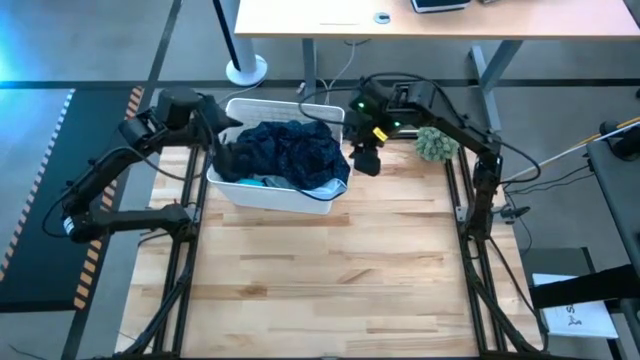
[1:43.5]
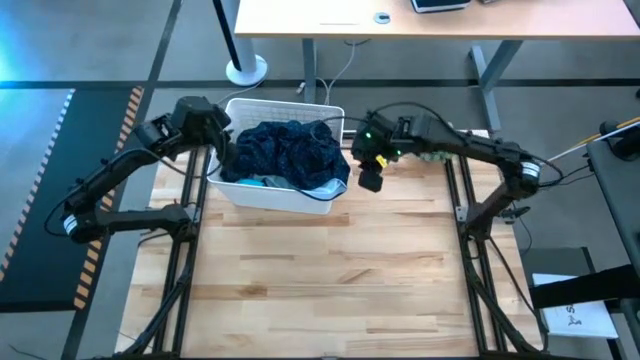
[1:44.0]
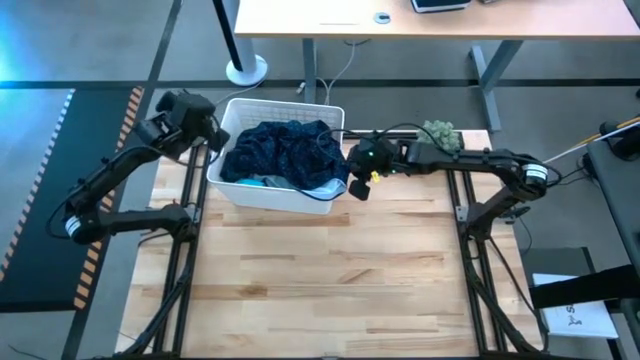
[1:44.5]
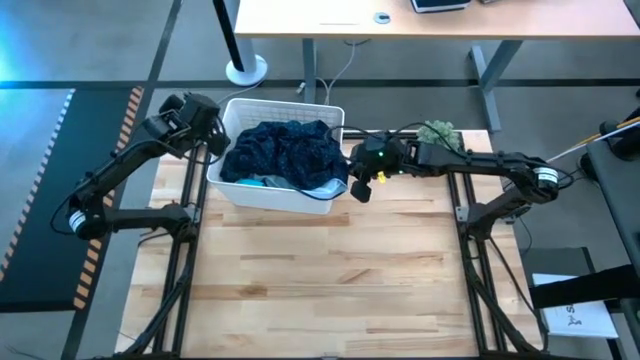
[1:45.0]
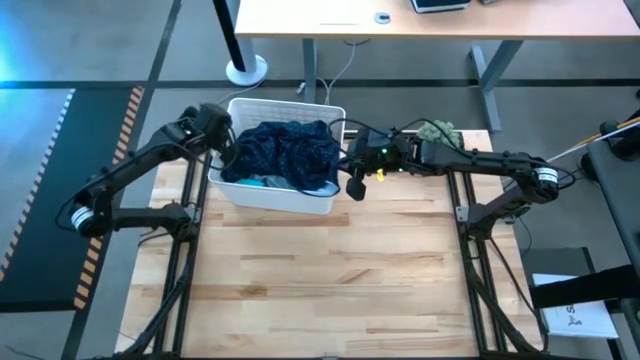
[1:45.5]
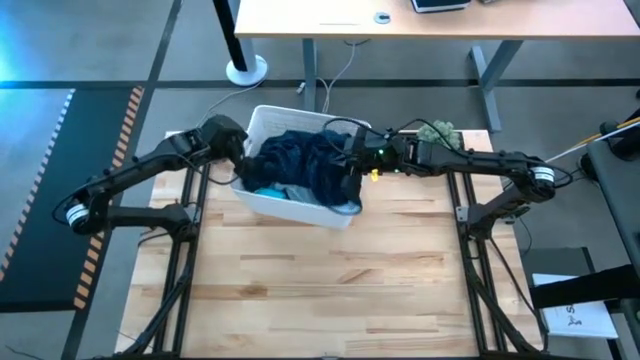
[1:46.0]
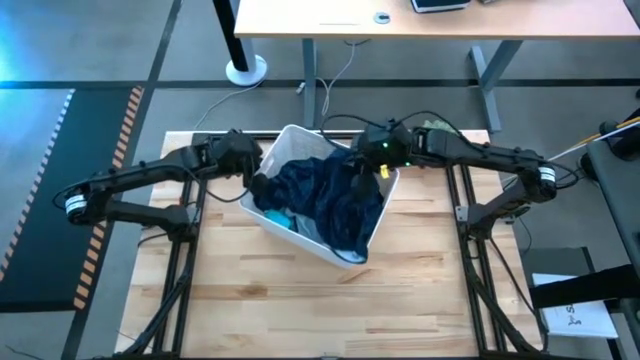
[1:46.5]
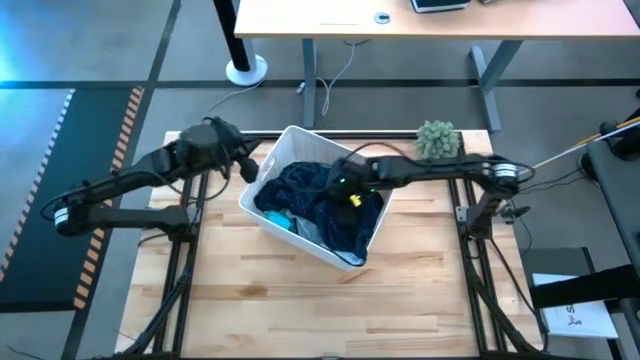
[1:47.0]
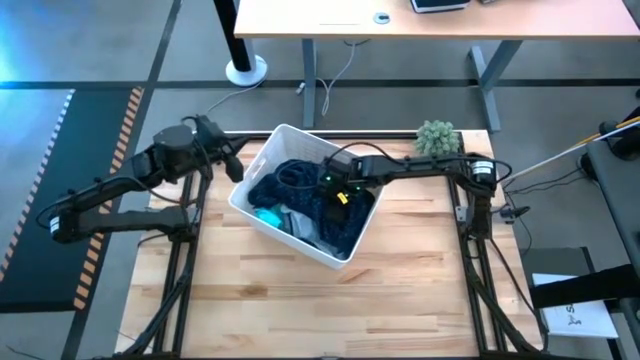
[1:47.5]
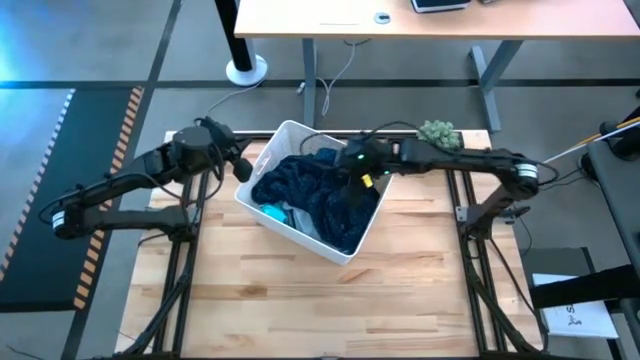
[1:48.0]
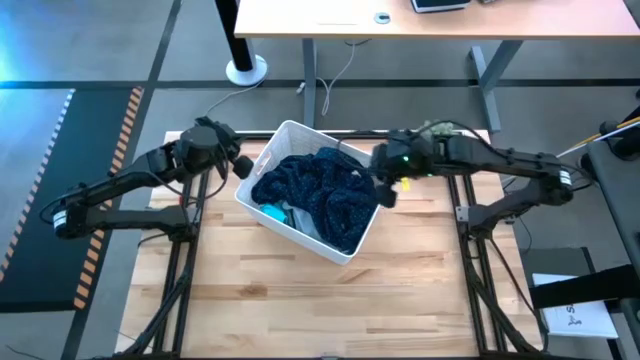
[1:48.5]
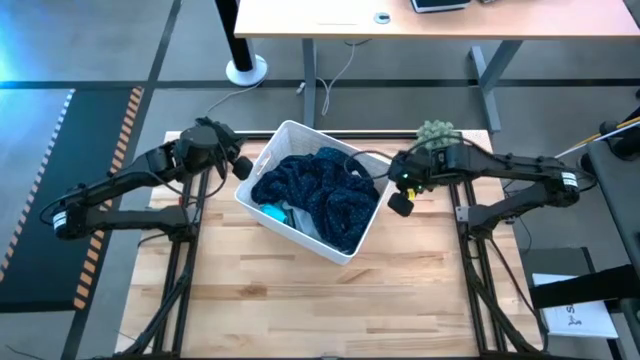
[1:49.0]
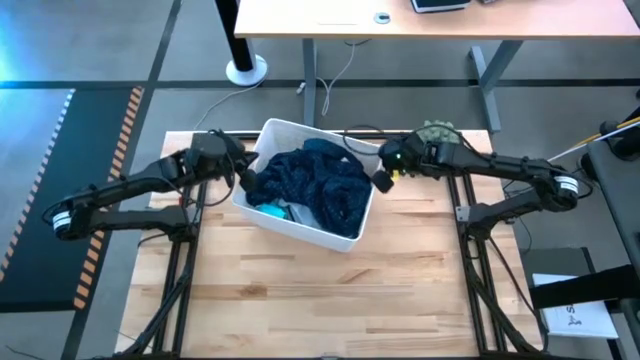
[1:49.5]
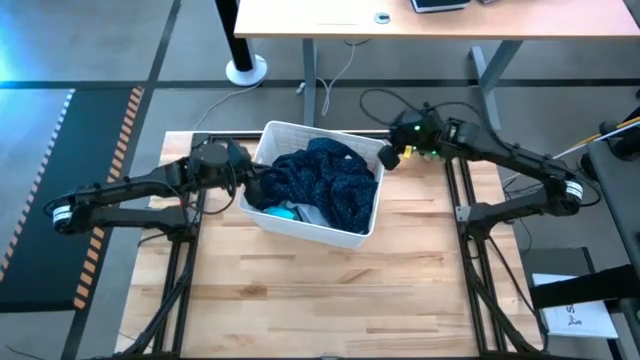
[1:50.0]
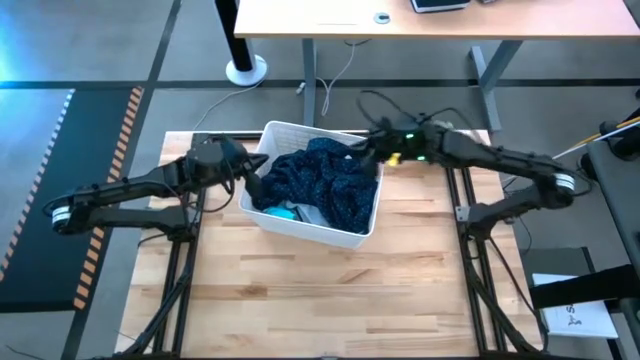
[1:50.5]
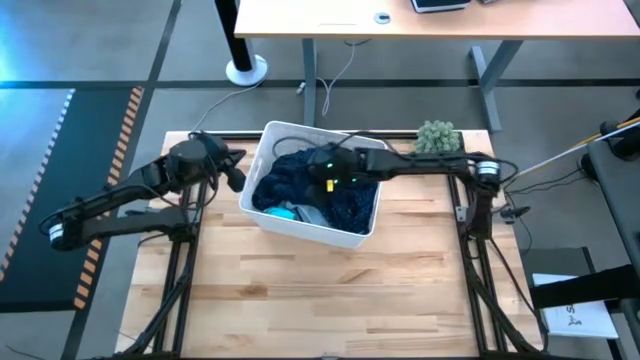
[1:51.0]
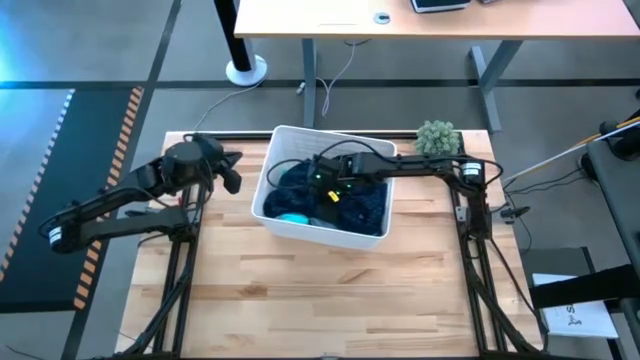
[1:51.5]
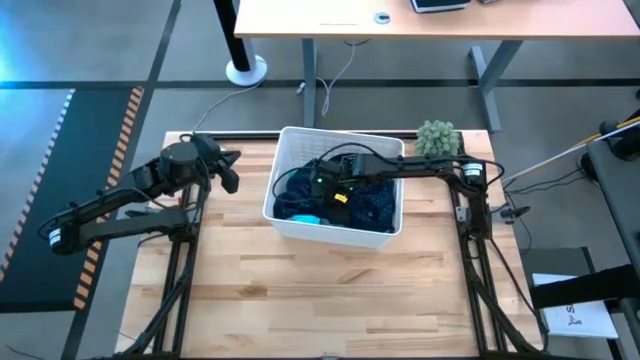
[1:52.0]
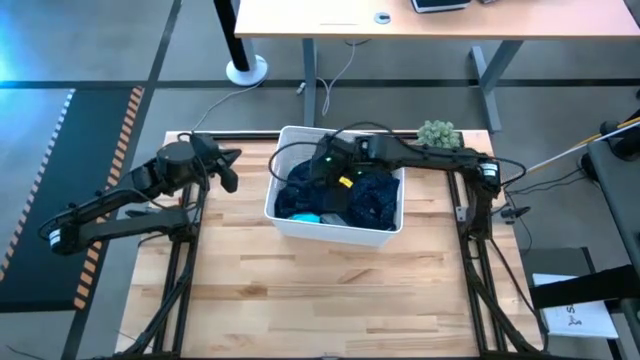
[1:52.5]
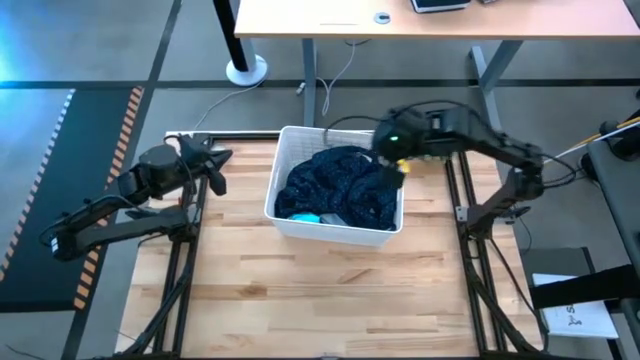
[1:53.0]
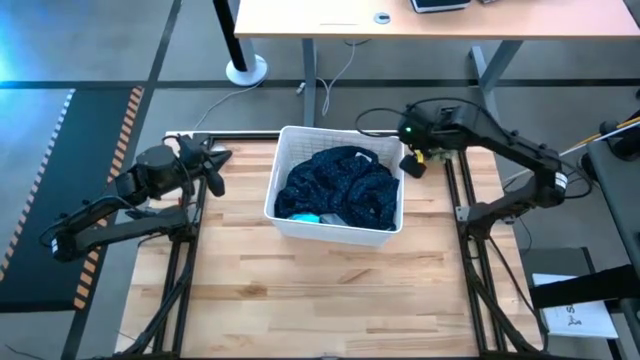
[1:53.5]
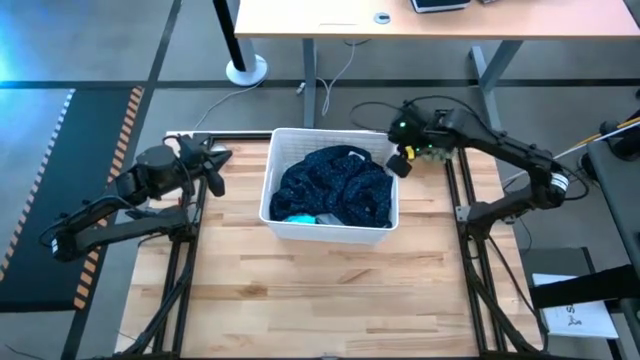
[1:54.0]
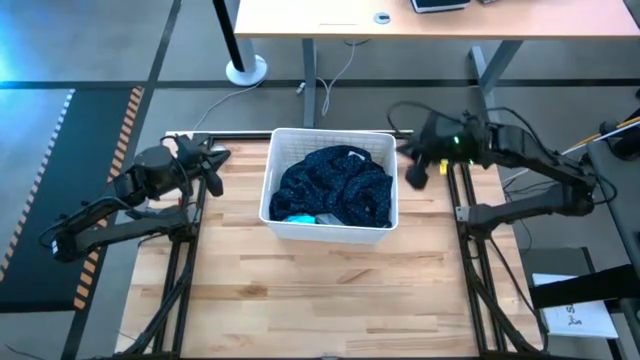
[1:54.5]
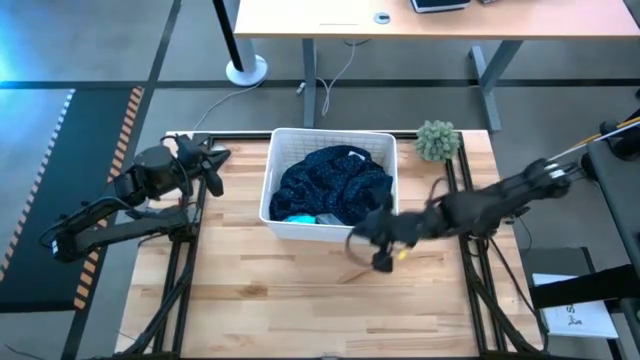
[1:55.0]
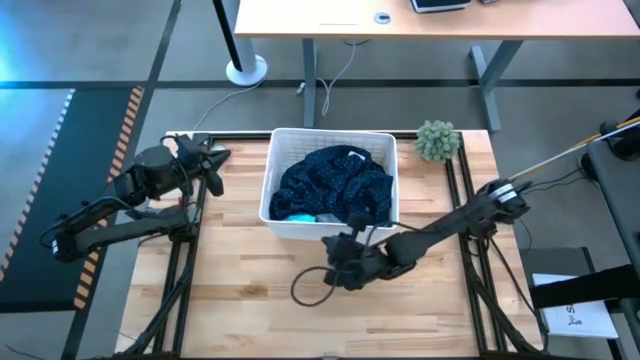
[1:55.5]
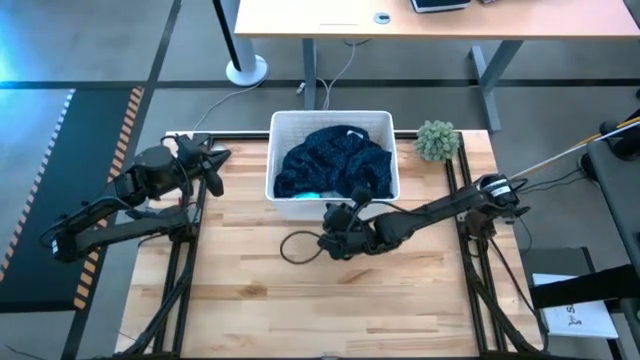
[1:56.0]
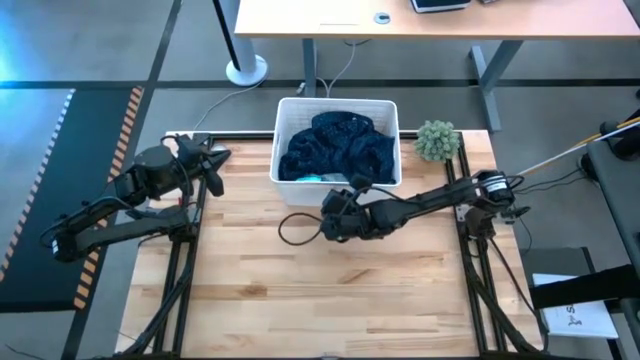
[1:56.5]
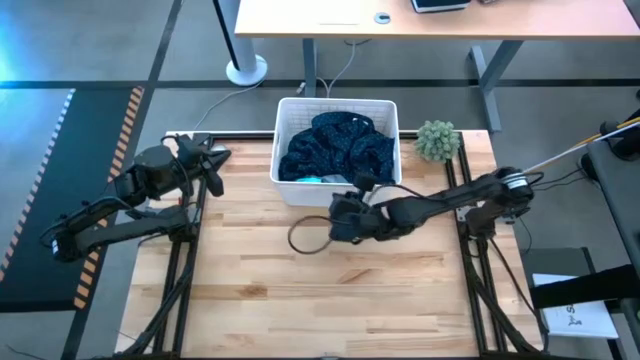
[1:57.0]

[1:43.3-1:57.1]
Task: Sort clothes
Move the white bin to the middle top of the table

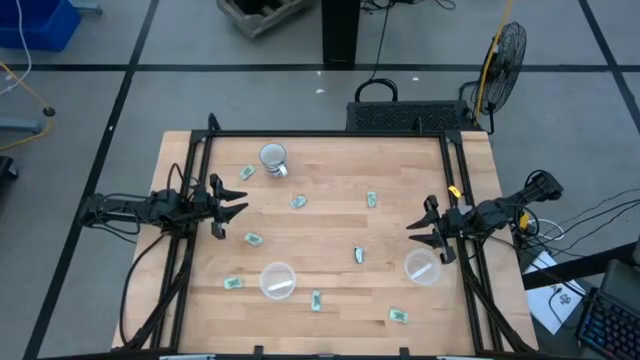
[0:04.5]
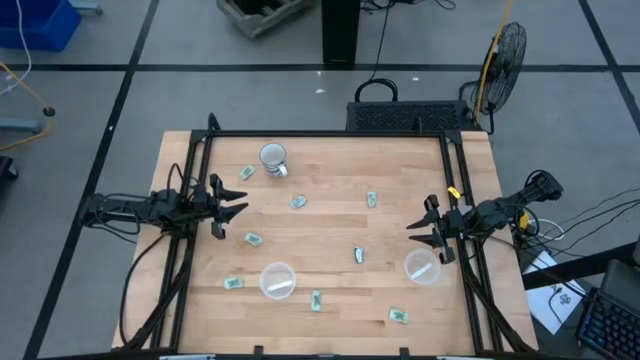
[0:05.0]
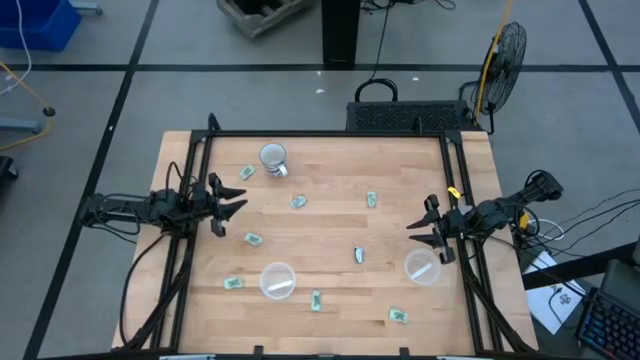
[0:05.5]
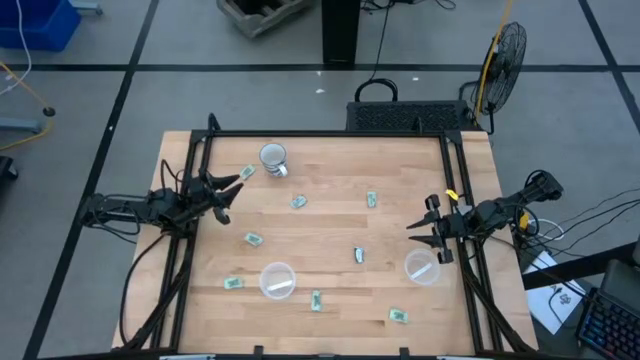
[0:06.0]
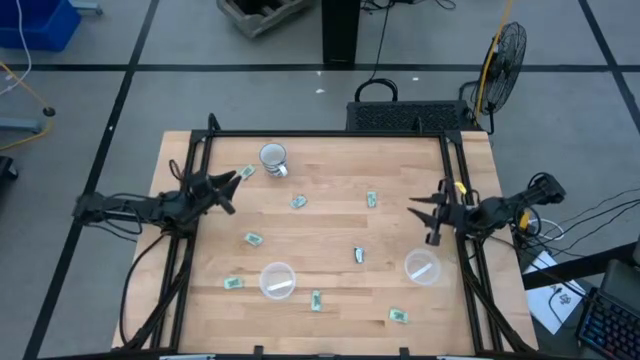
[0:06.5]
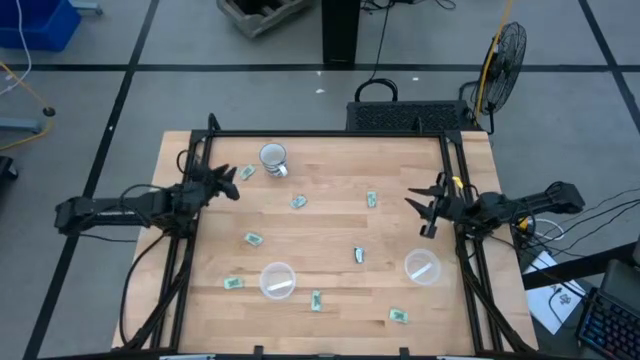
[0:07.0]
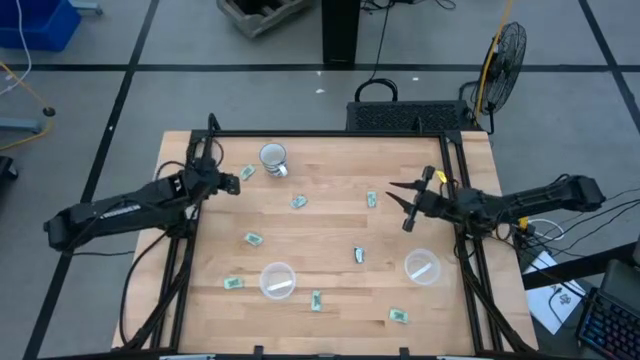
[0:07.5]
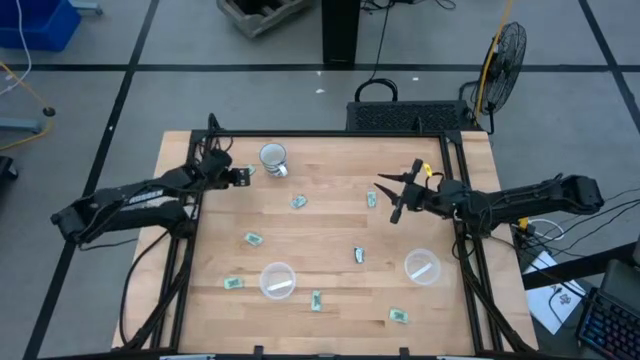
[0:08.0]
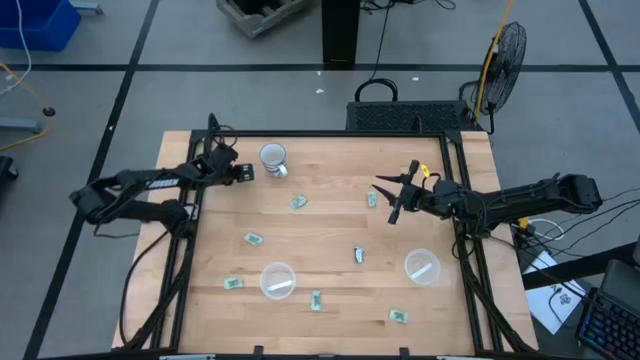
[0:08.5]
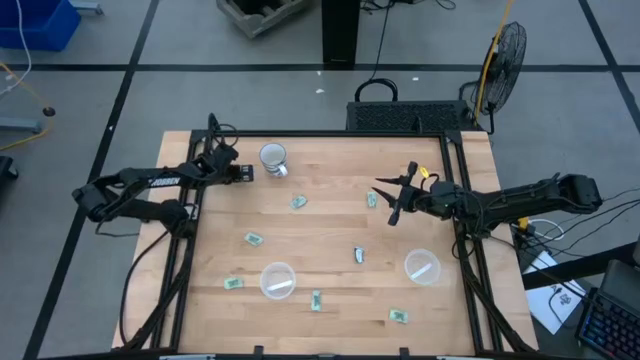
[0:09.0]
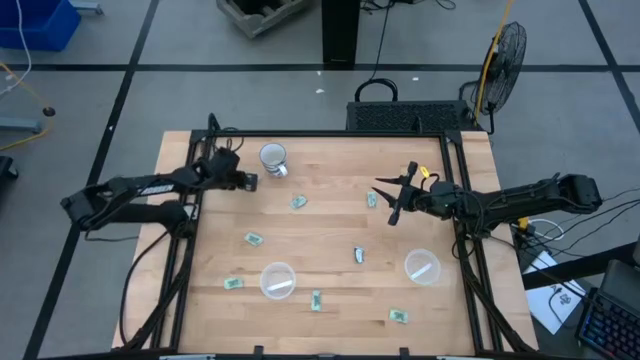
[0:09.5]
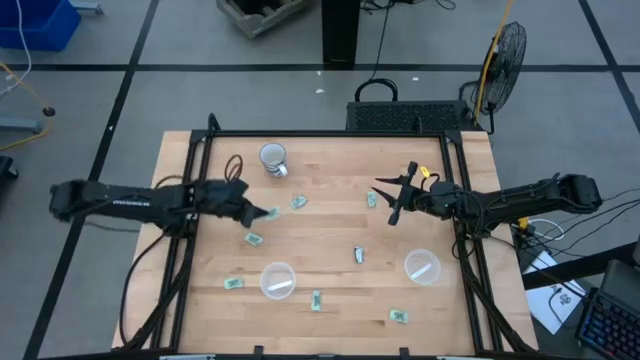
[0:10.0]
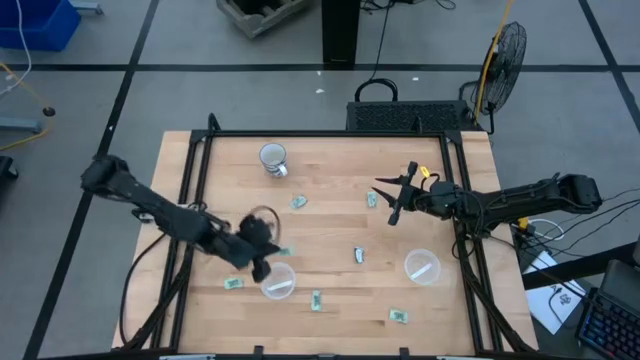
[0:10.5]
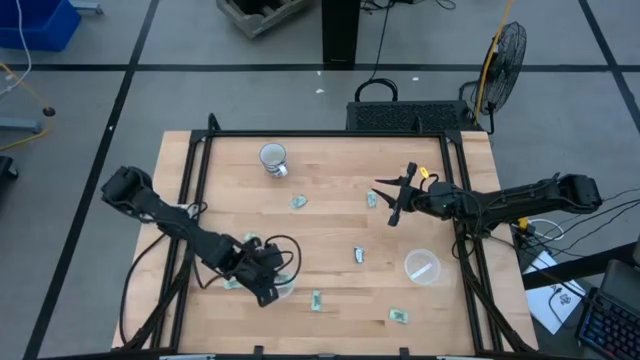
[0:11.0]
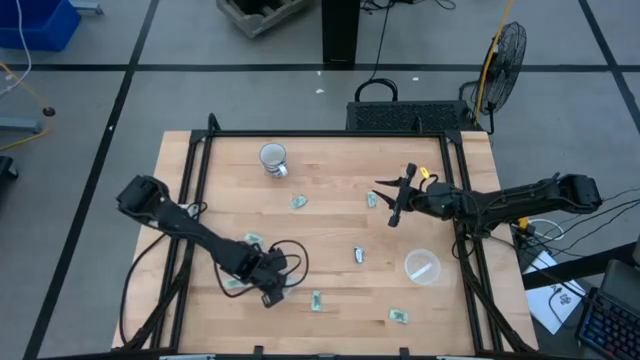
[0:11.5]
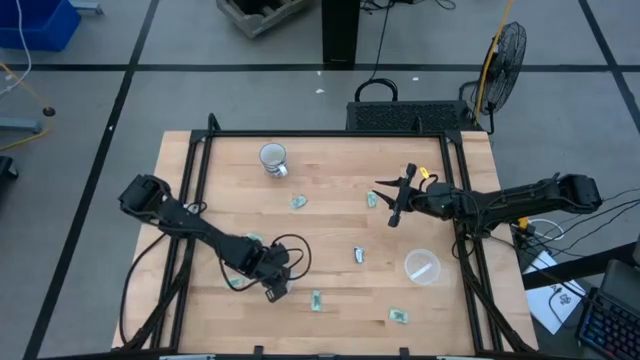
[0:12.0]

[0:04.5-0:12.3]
Task: Pick and place items into bin
Put the stevia packet into the left transparent bin
